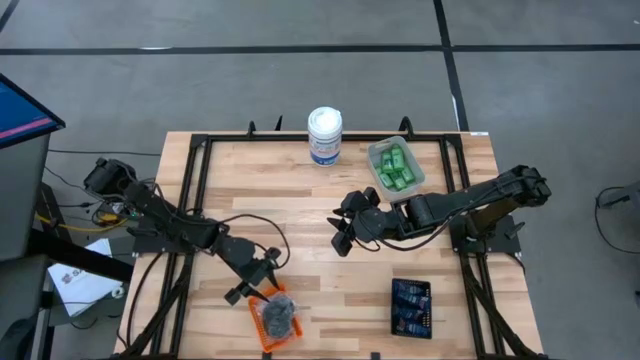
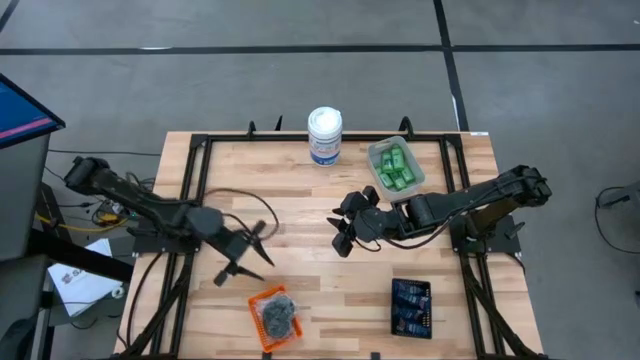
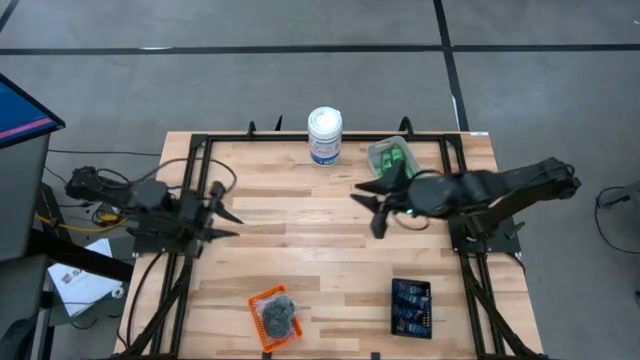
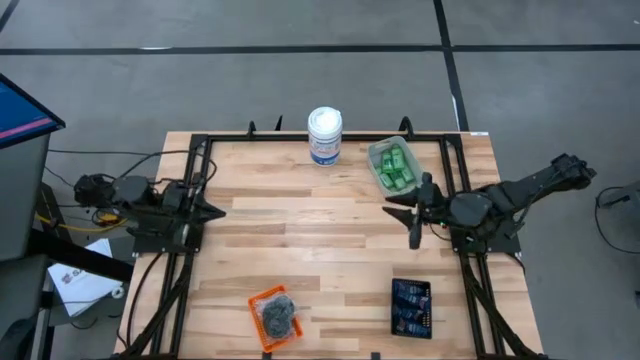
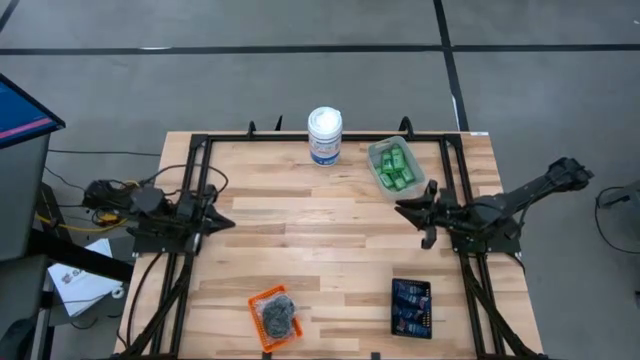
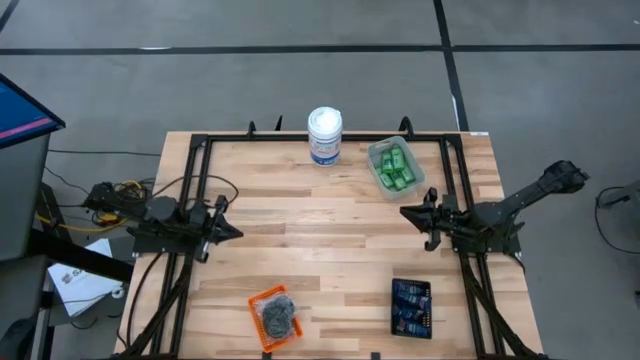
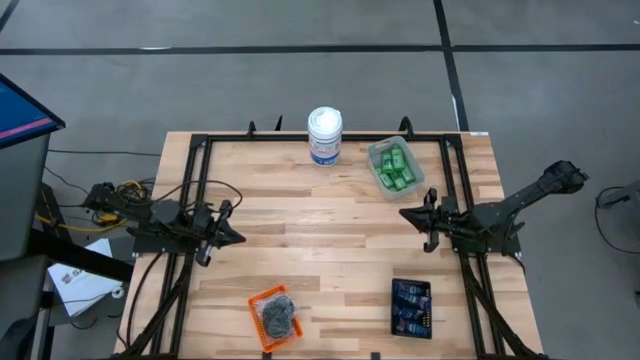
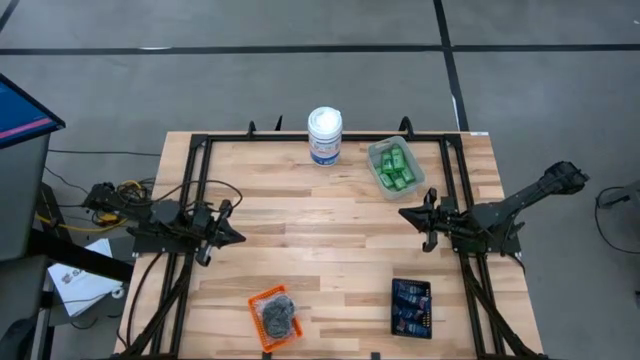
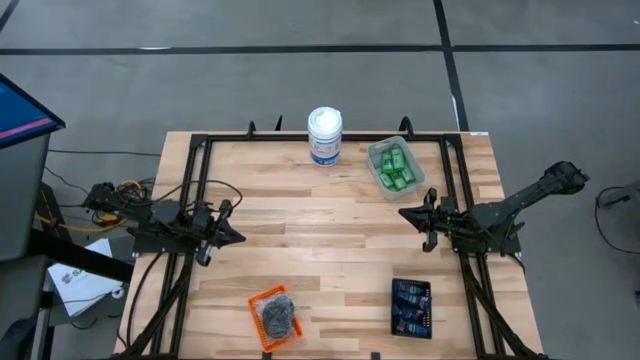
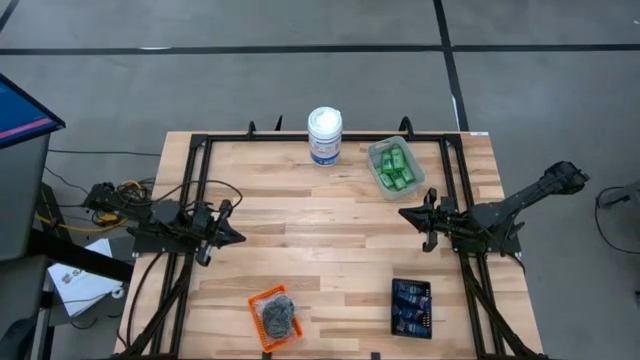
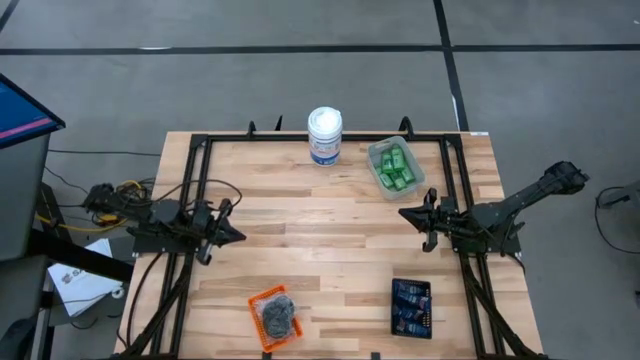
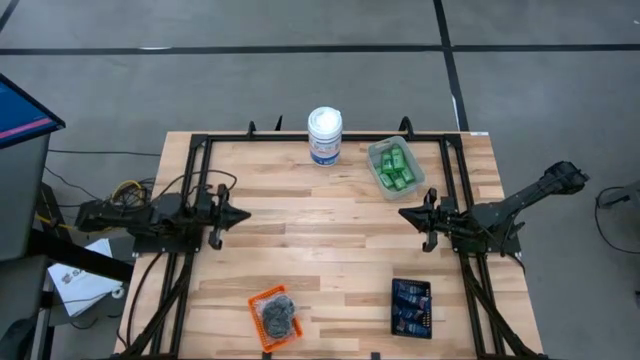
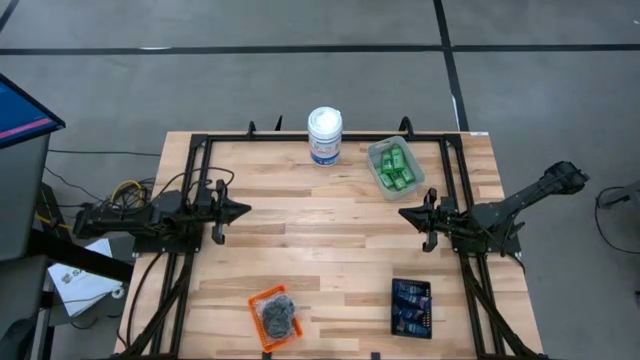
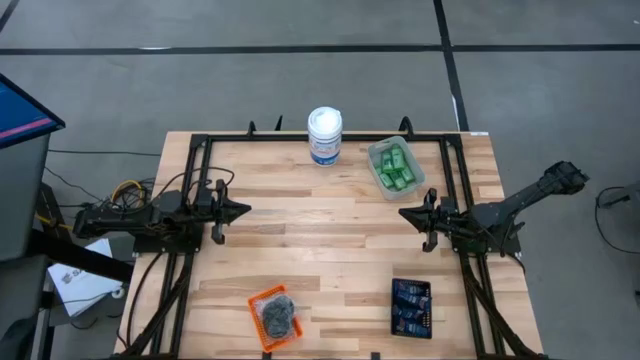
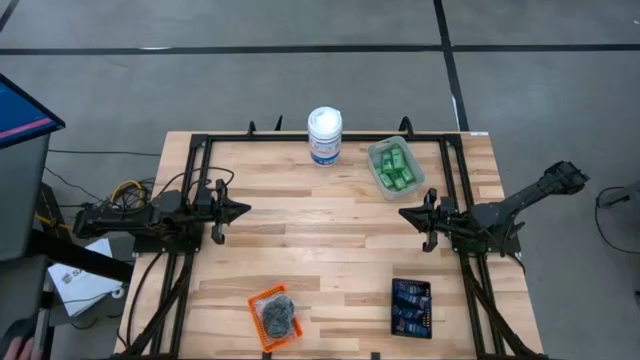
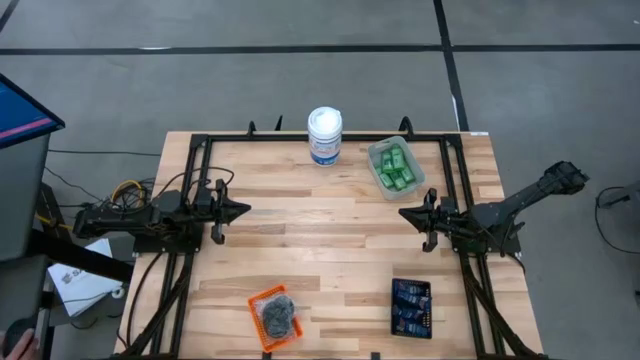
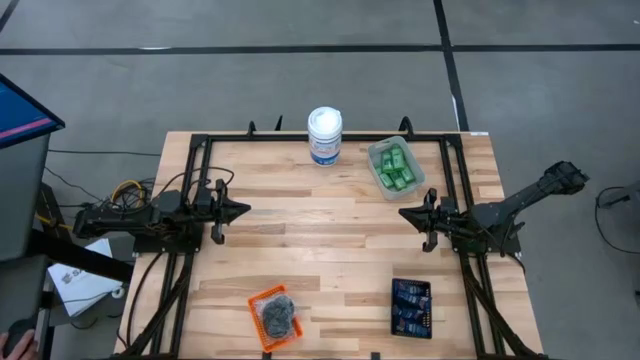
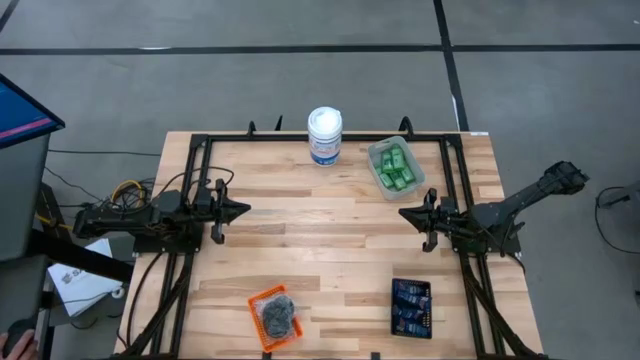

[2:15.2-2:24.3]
Task: Pick & Place Travel size toiletries
Return to Home Position

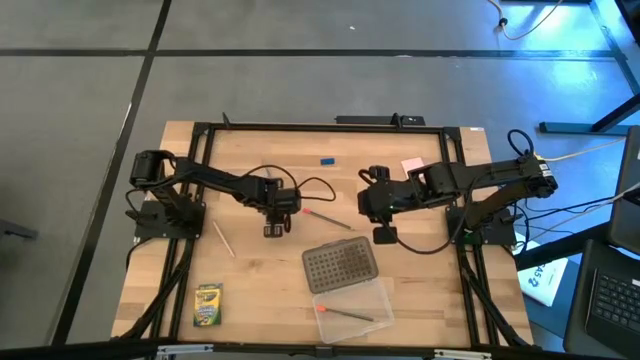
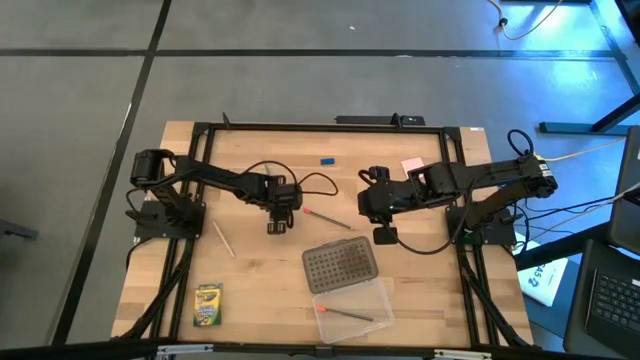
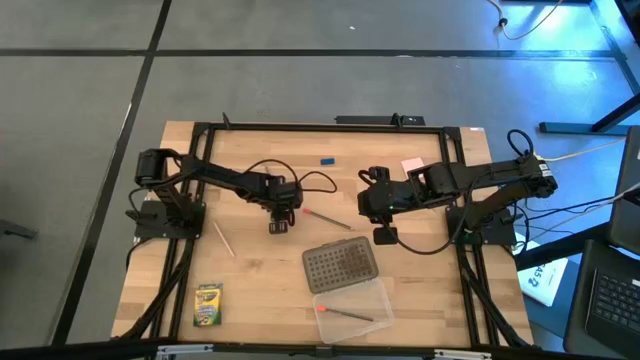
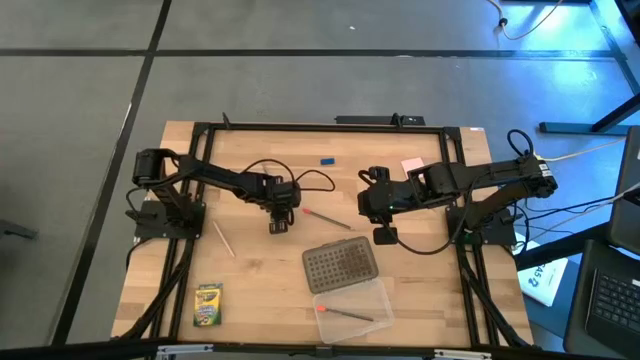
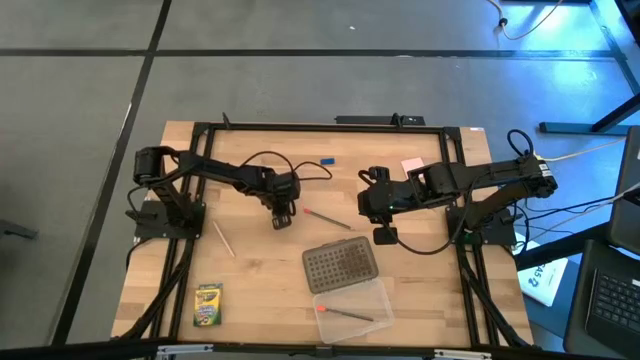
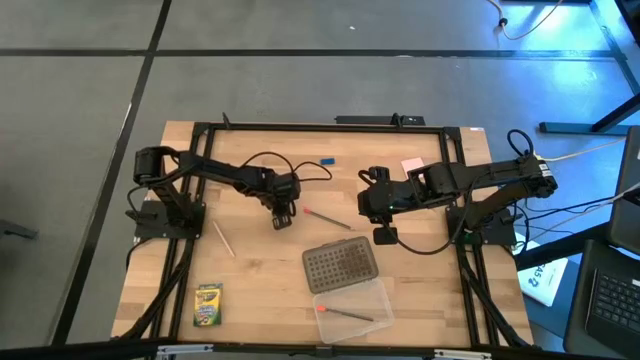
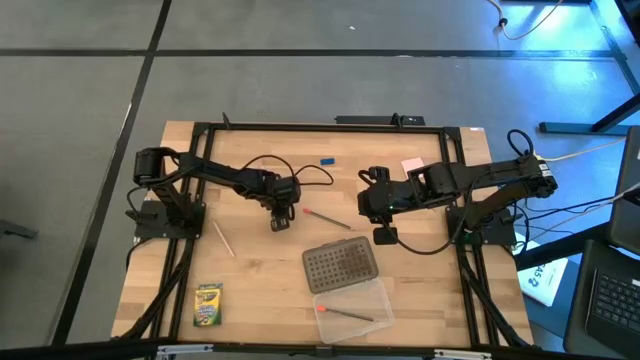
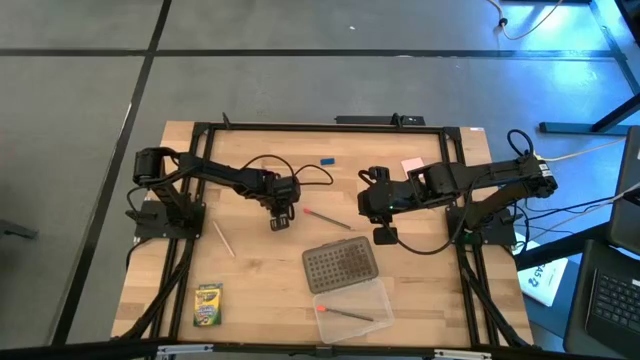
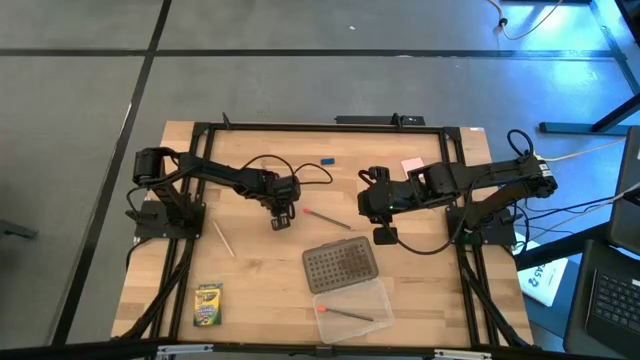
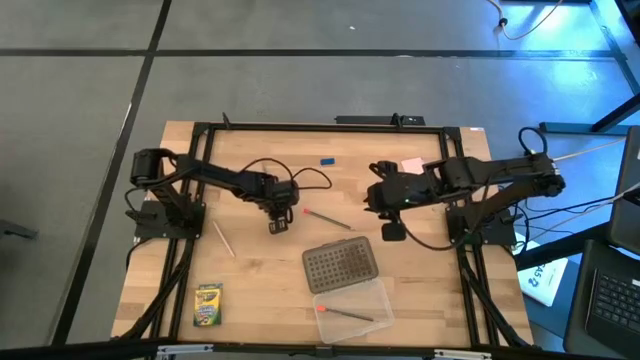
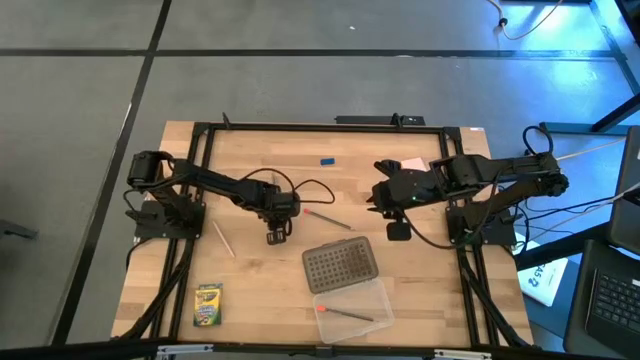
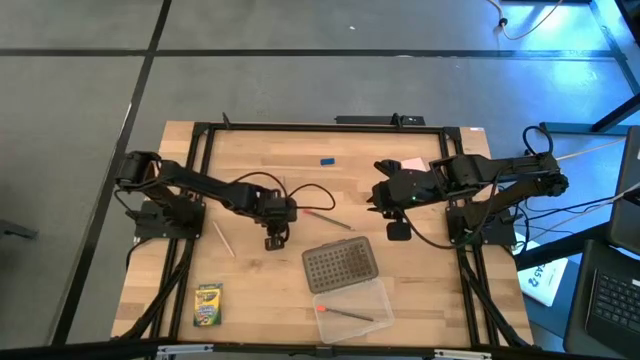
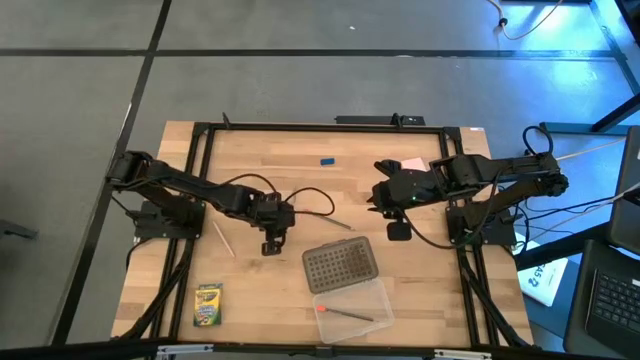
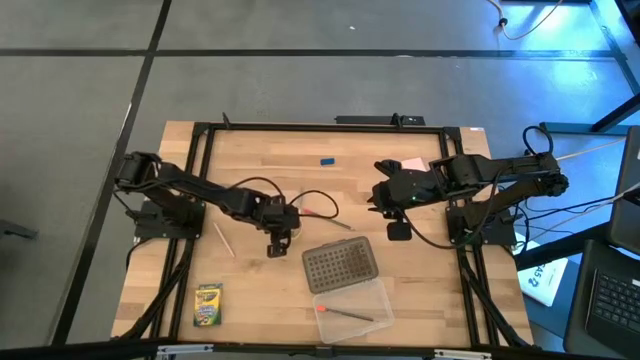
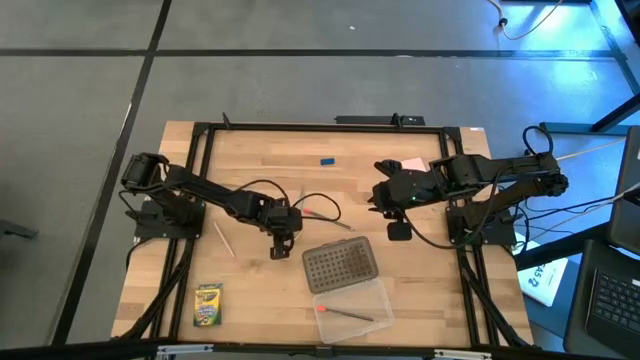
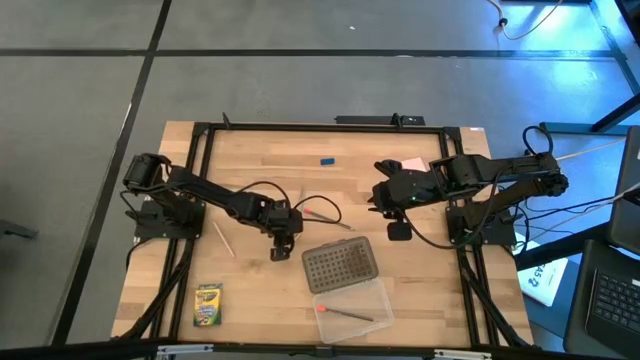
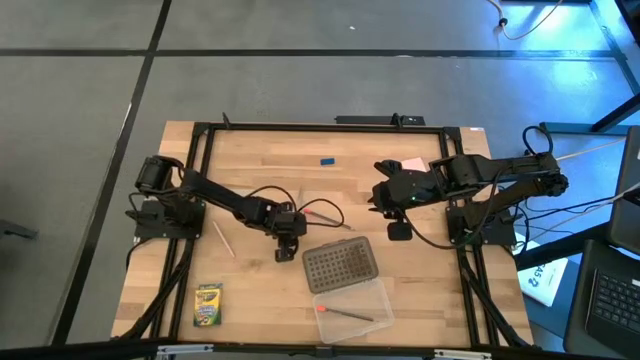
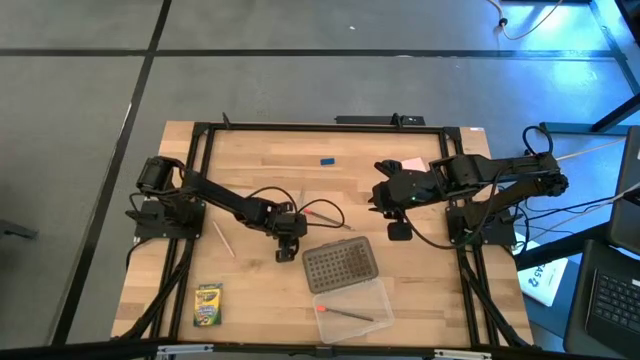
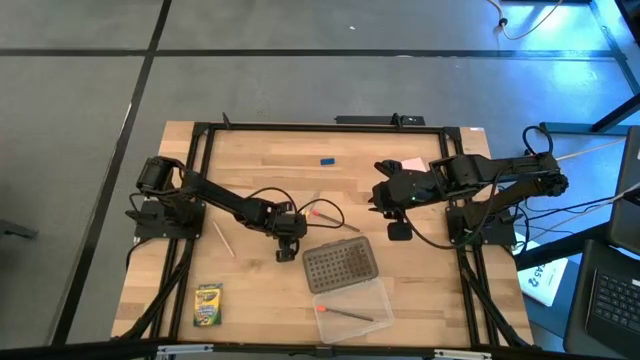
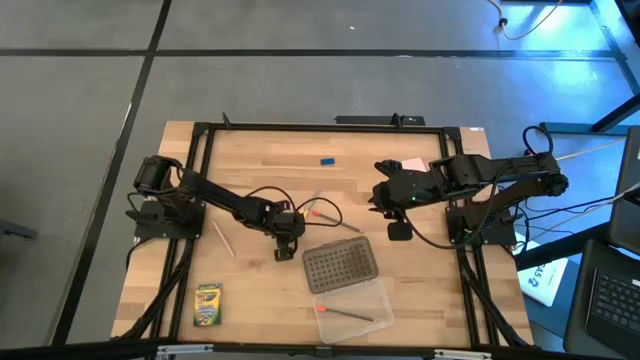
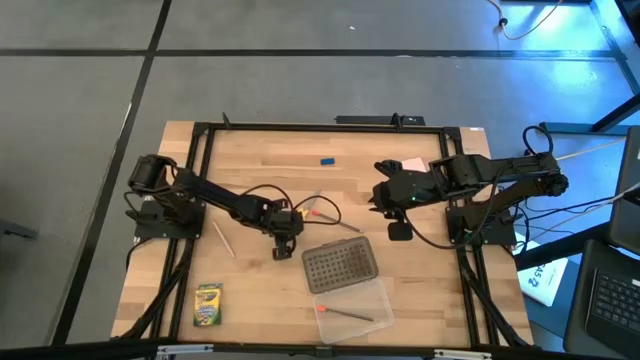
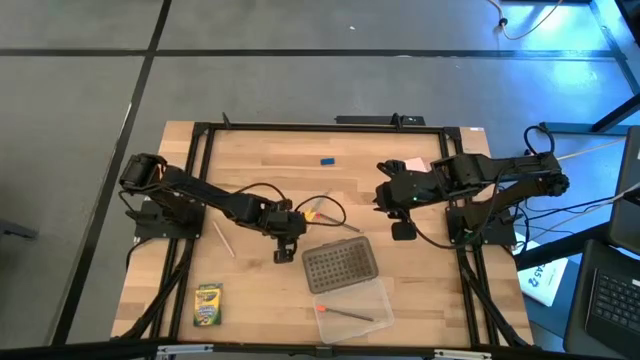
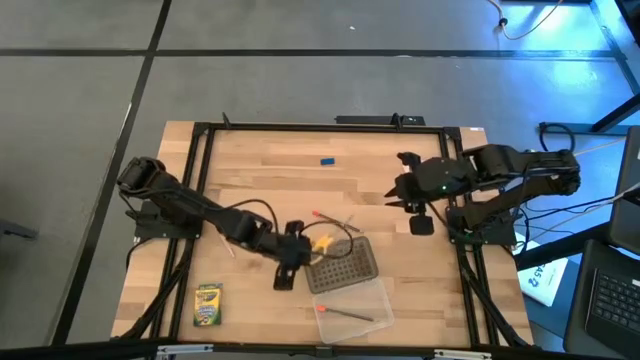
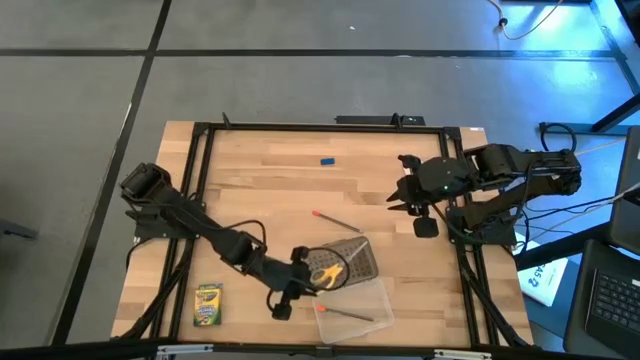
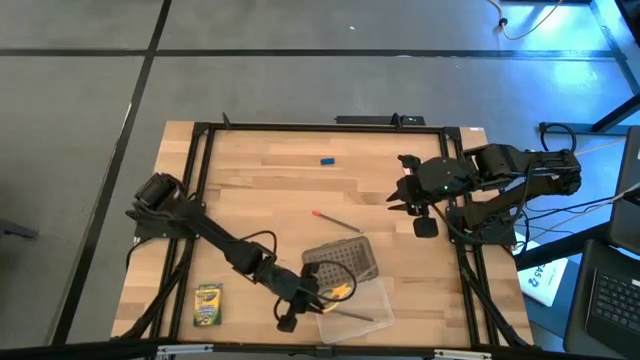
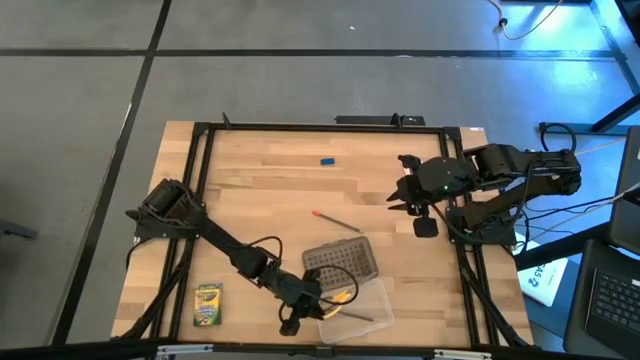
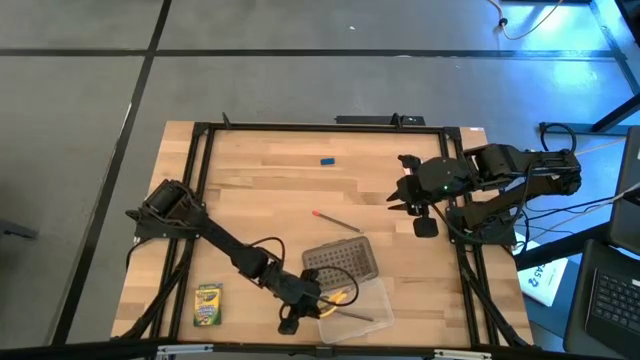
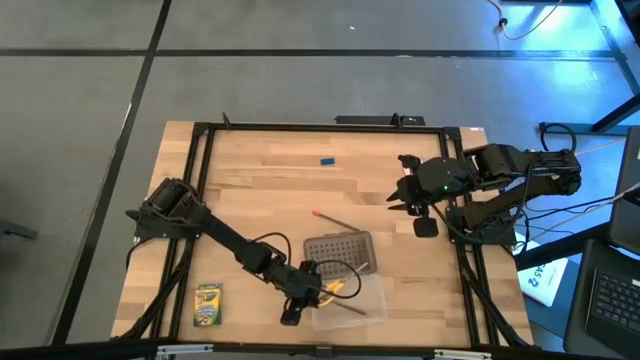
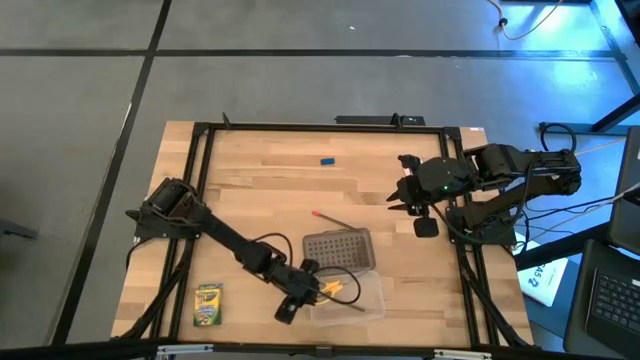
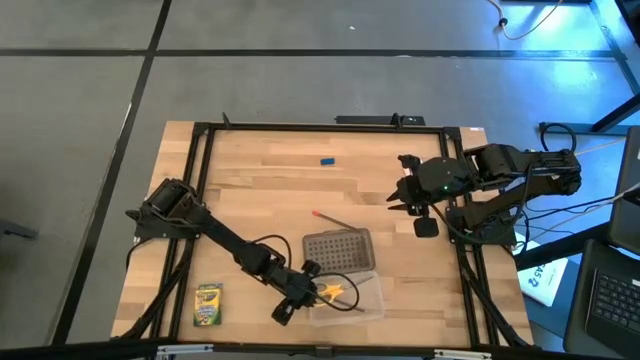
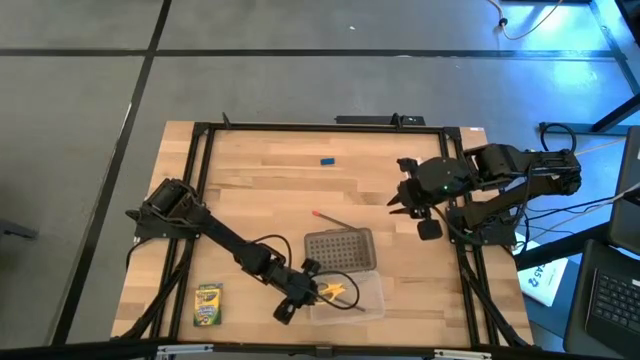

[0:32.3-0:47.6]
Task: Pack school essentials
Put the yellow scissors into the supply box
